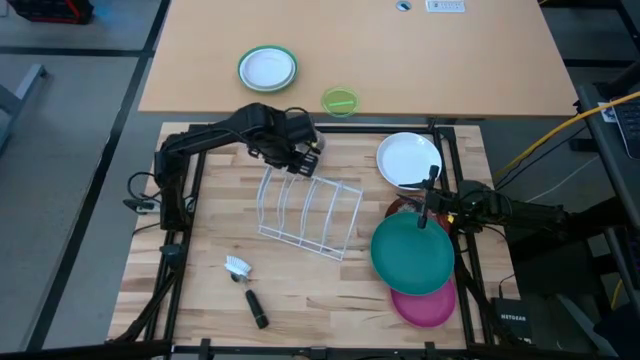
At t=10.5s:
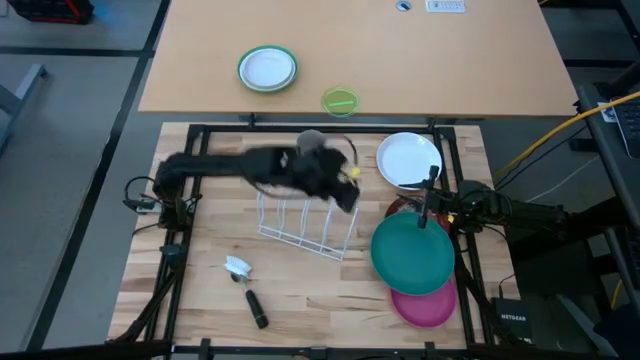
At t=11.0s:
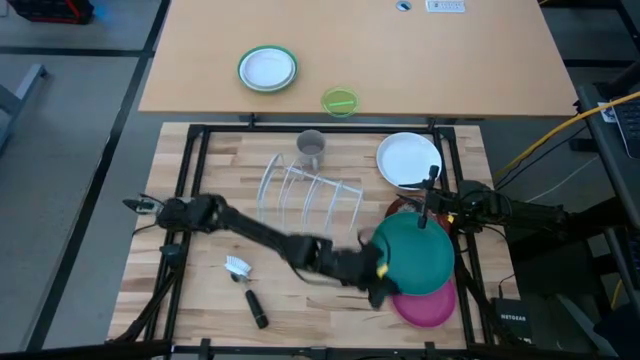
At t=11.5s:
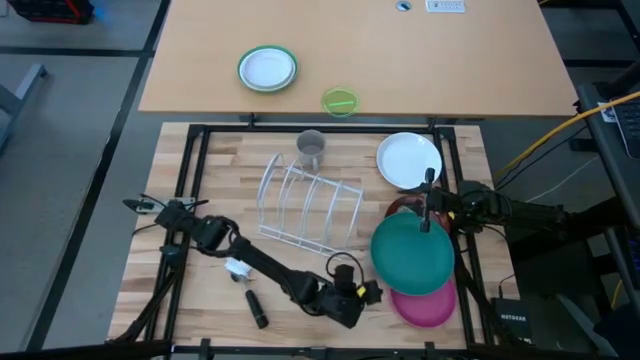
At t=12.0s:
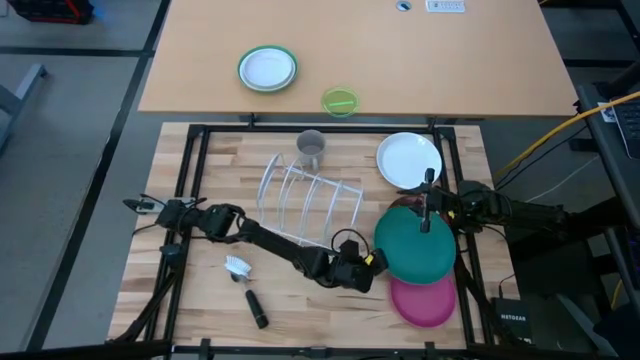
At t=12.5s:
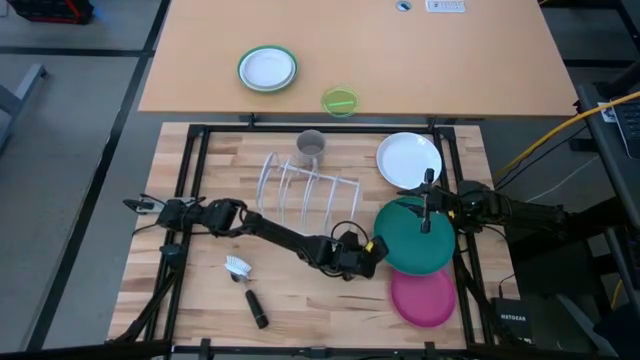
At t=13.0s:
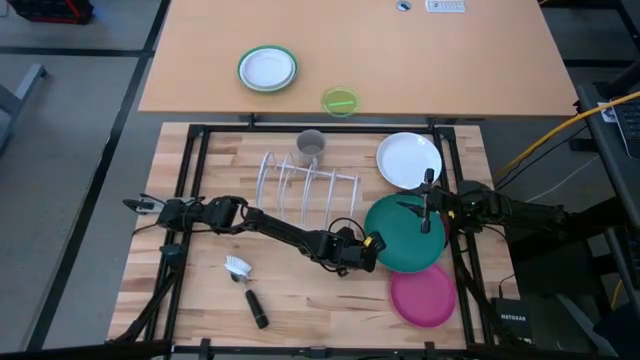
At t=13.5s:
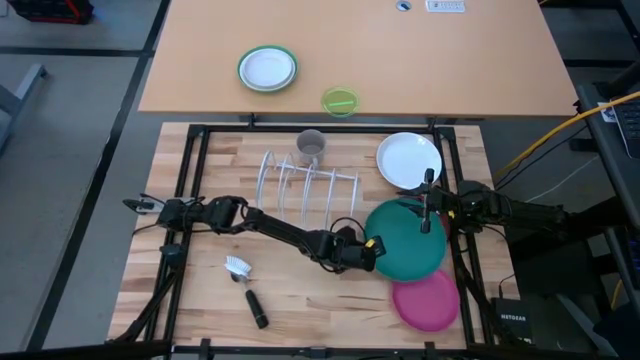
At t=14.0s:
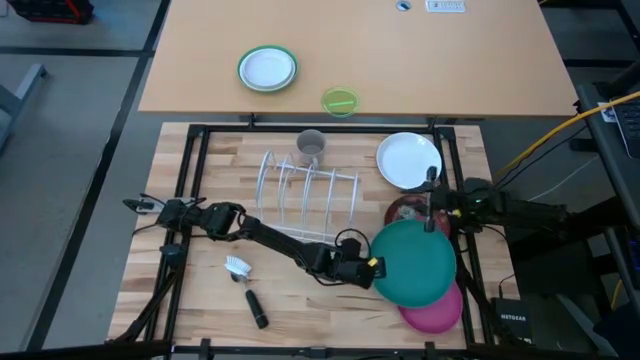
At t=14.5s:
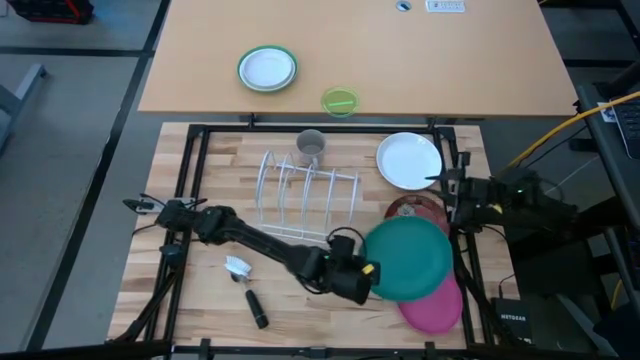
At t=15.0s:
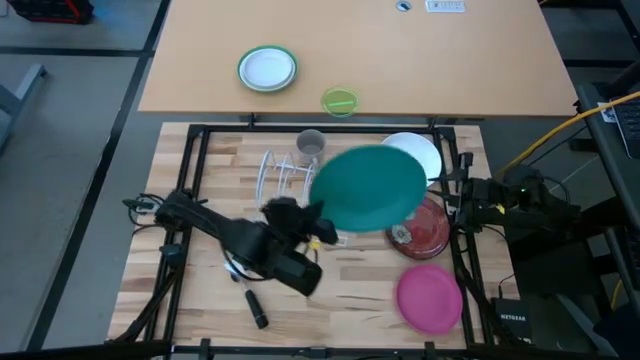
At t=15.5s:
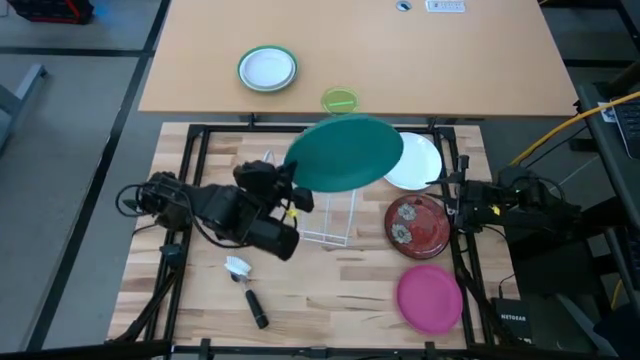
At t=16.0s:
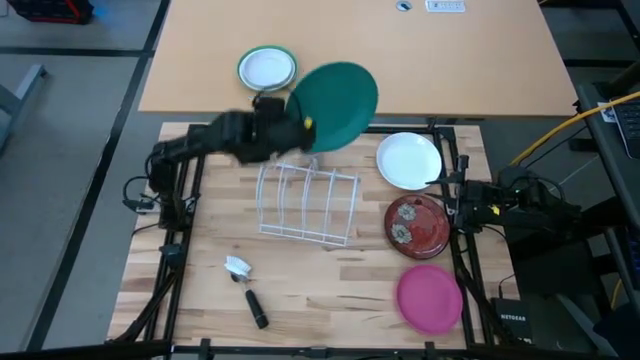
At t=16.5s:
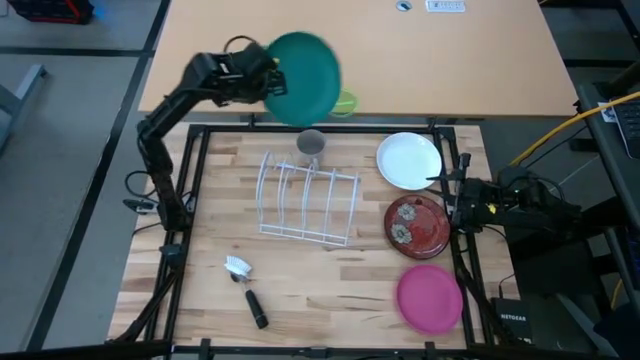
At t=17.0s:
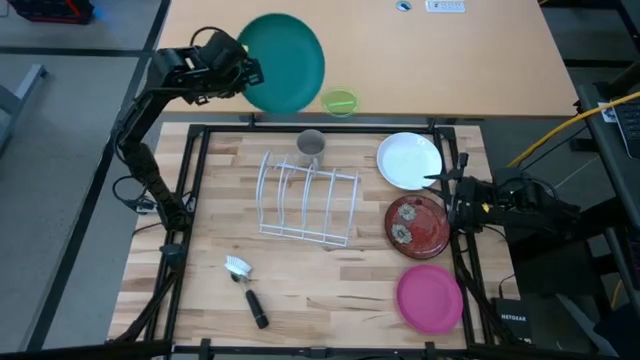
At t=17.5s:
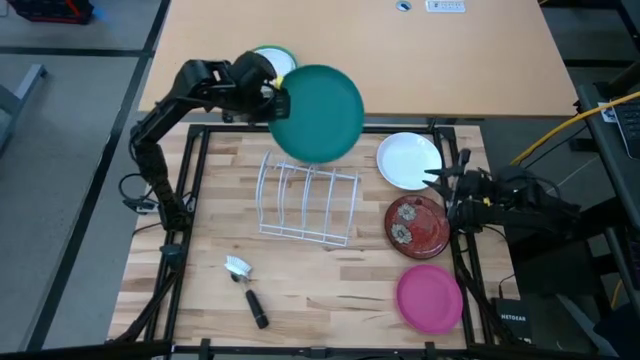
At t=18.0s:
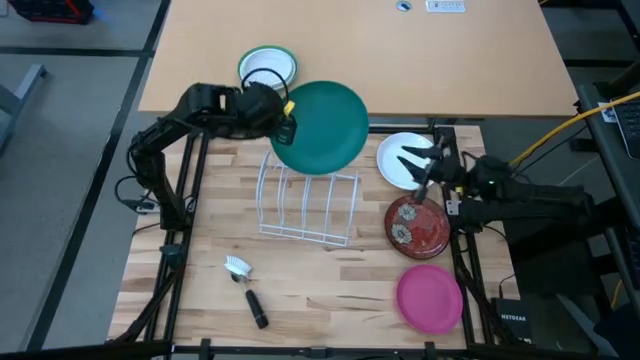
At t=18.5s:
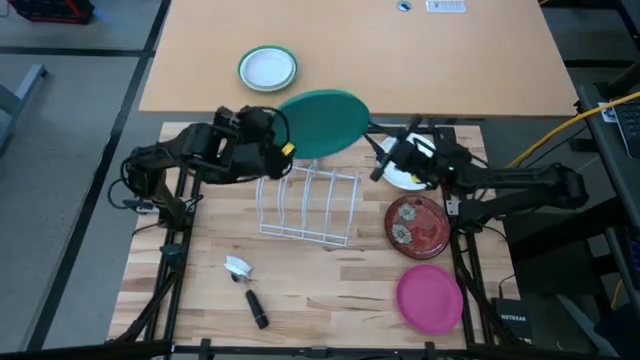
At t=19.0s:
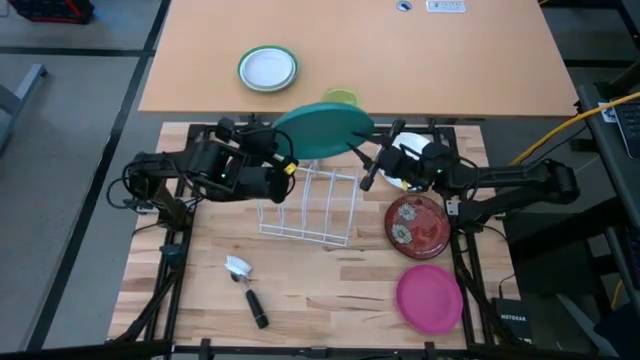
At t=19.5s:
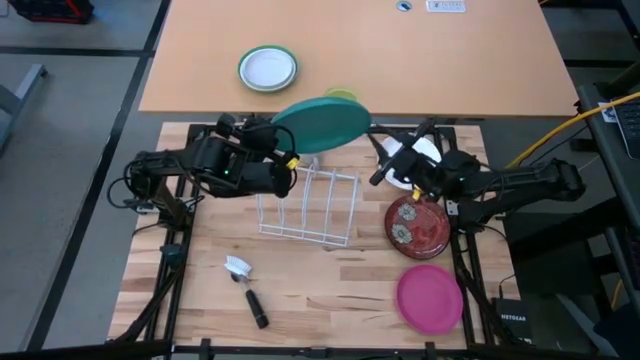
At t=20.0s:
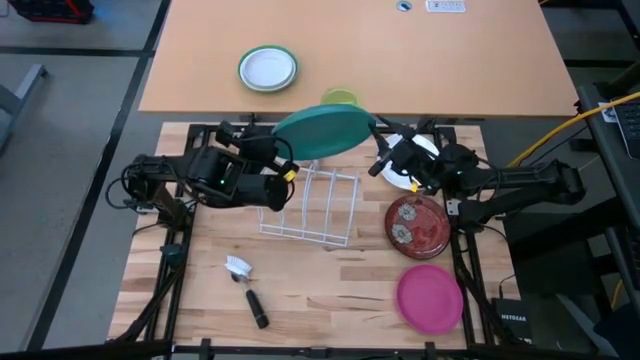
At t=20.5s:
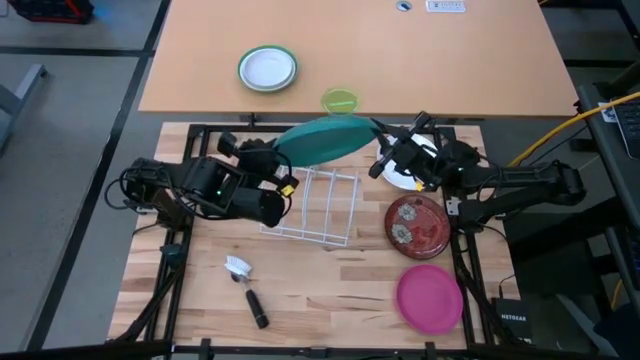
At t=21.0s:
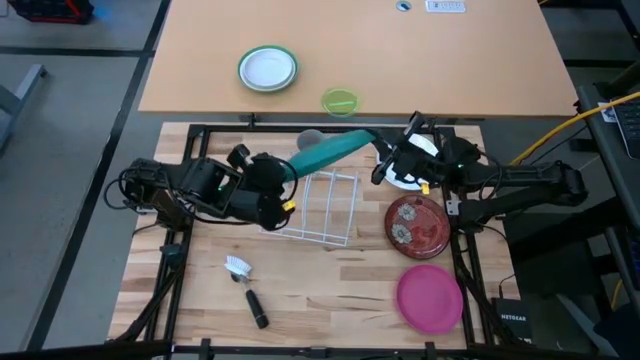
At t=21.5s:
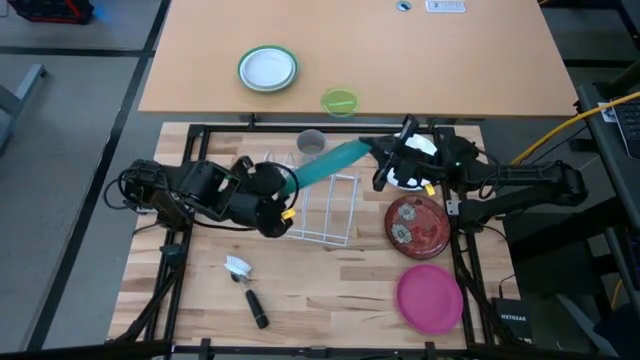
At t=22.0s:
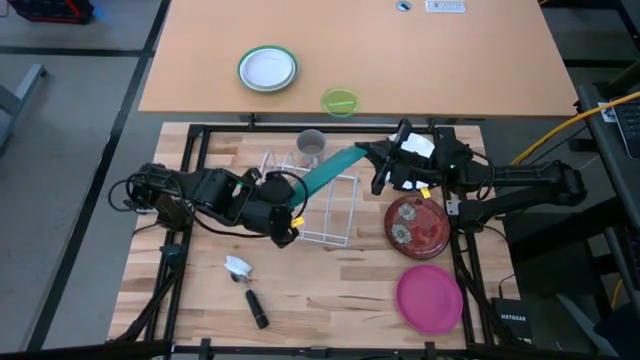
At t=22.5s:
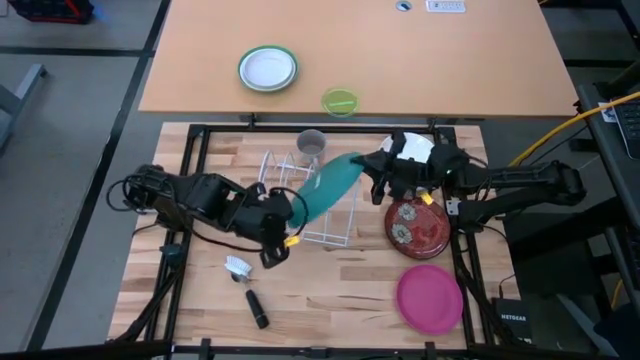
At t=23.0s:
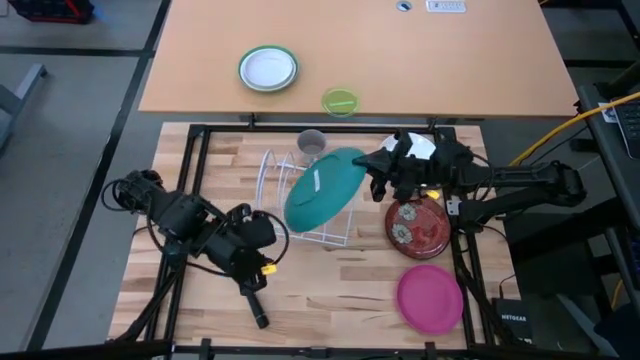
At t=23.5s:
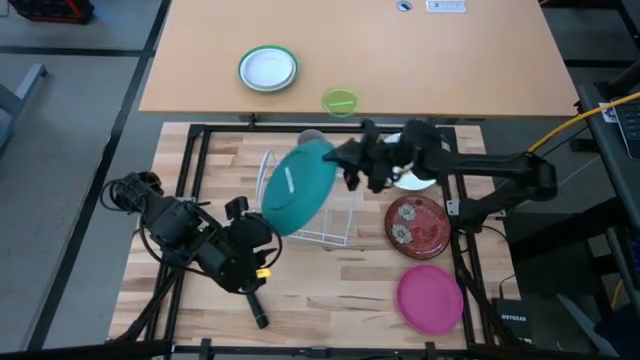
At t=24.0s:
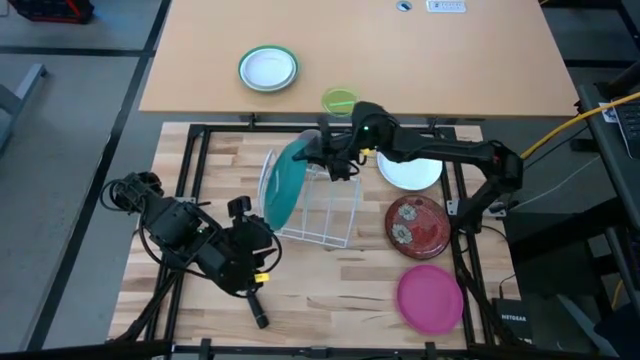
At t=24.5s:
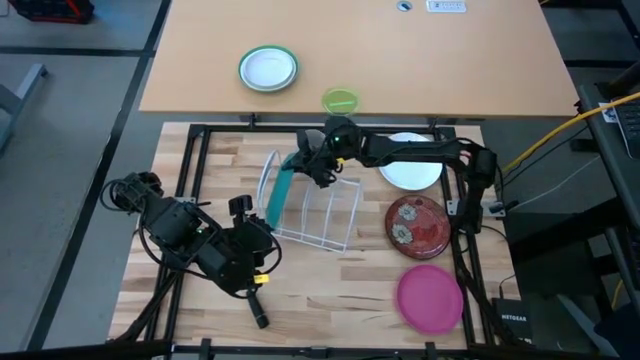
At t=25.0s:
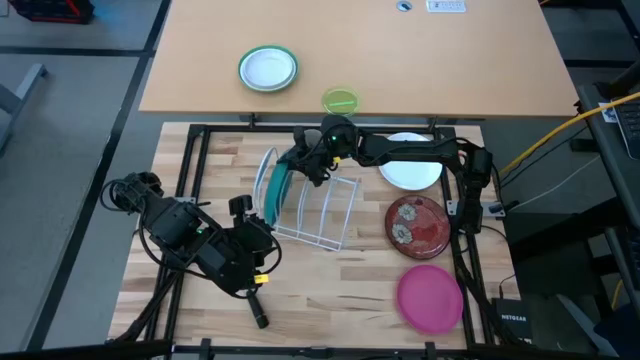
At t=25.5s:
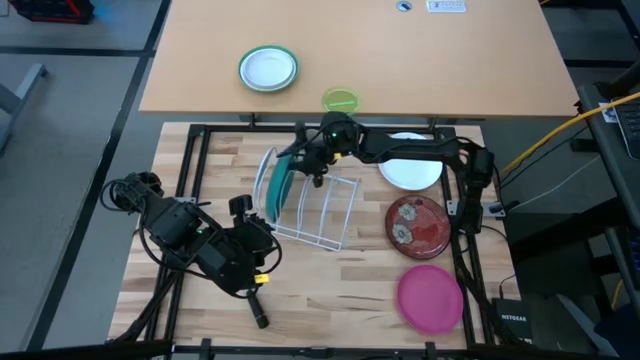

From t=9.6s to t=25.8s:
Task: Sort dishes
Put the blue plate into the dish rack
